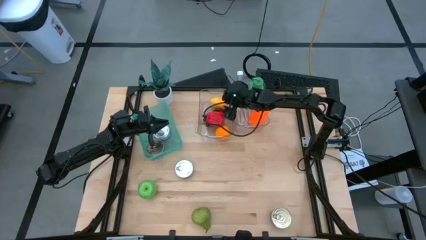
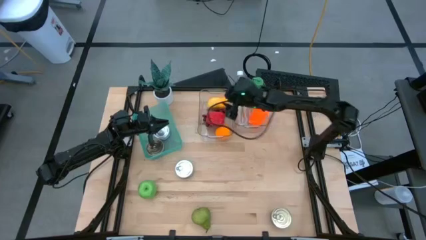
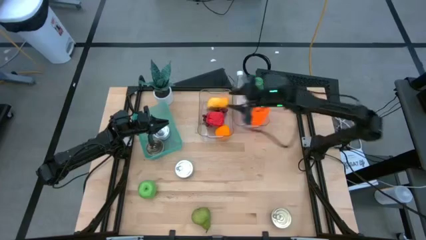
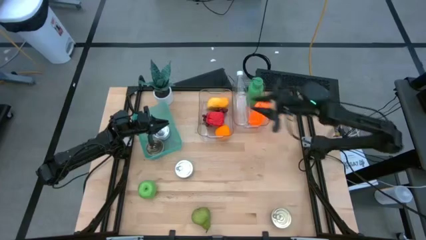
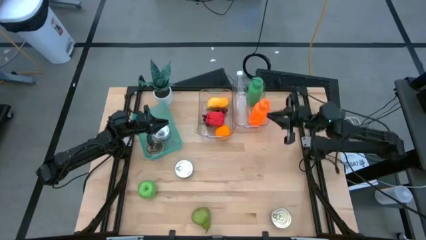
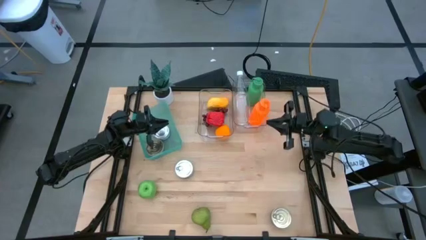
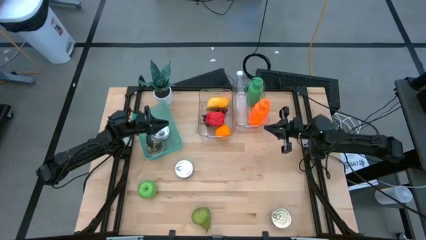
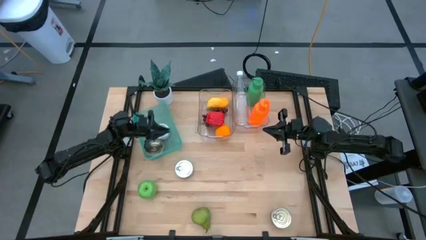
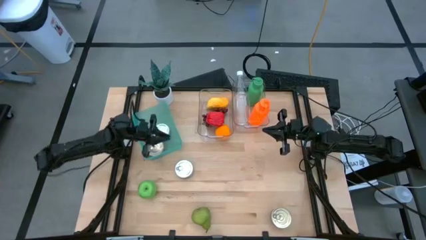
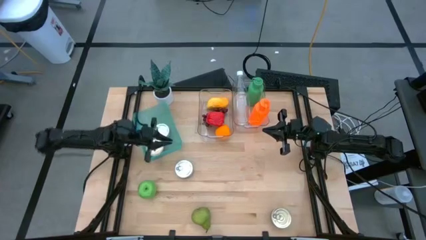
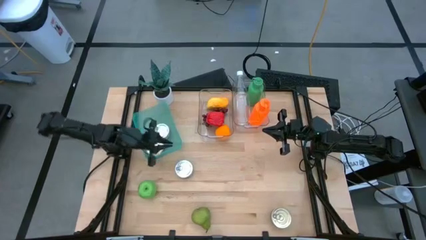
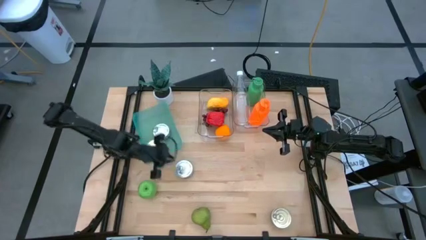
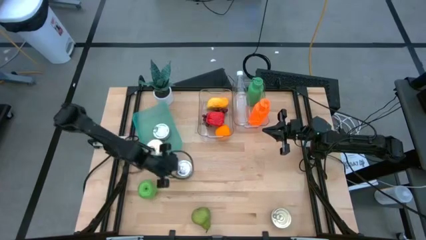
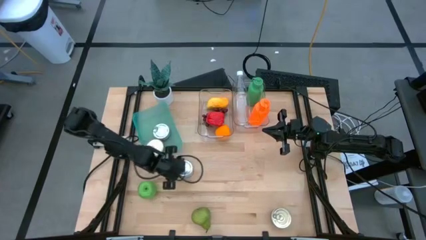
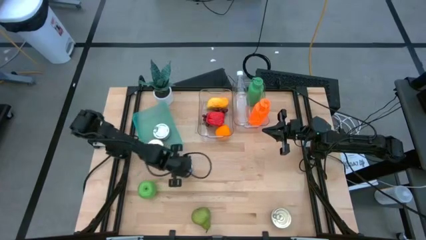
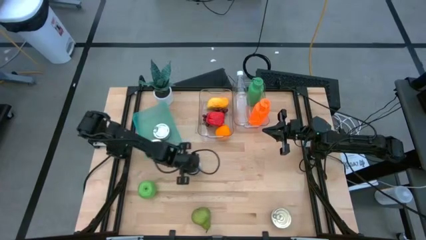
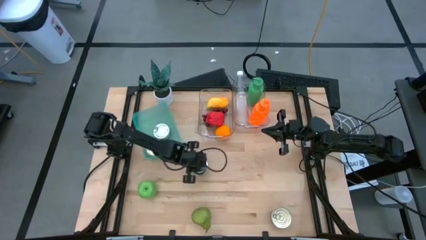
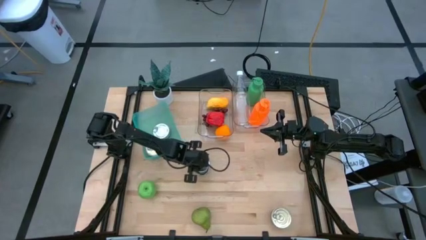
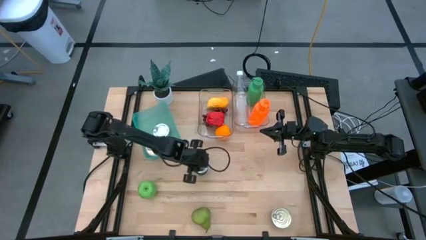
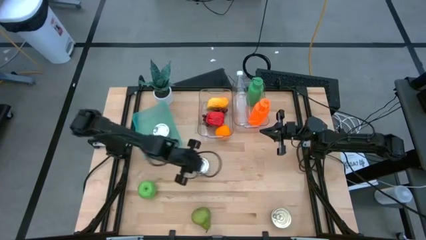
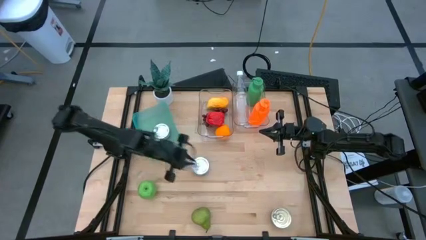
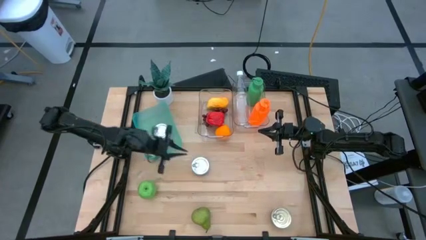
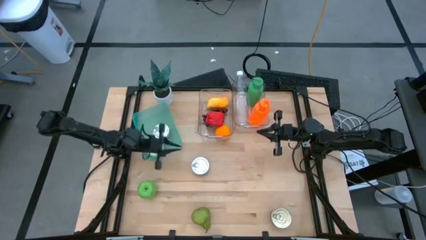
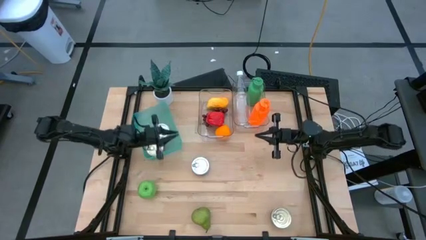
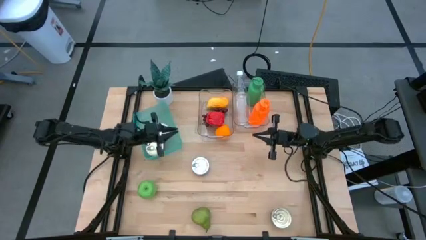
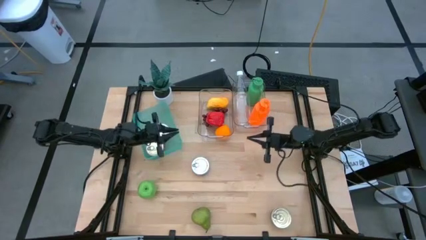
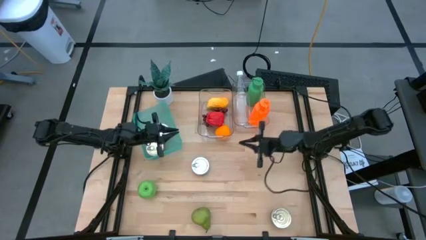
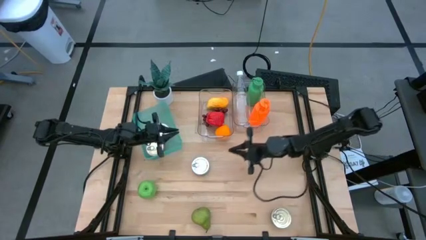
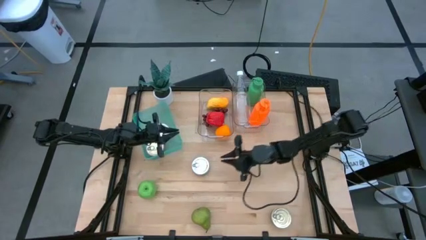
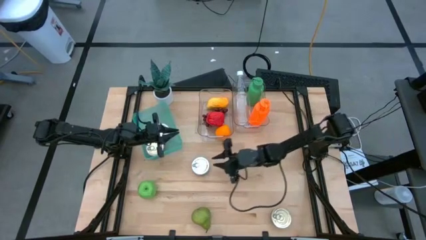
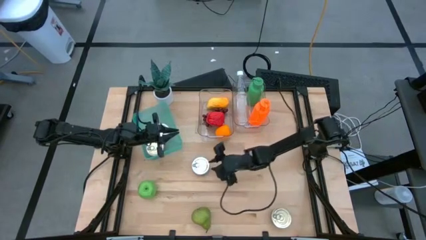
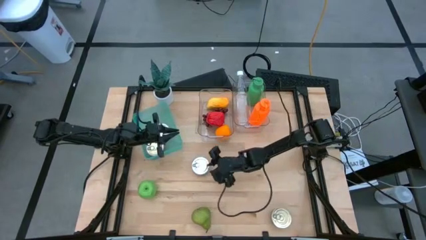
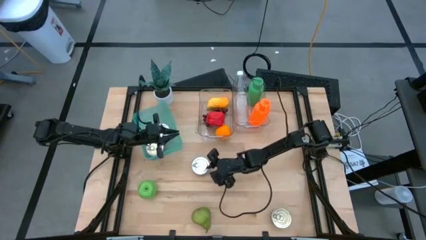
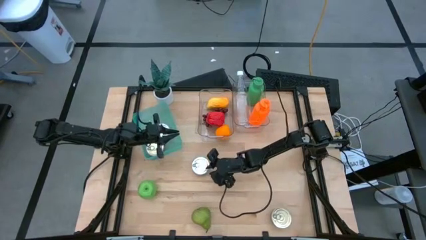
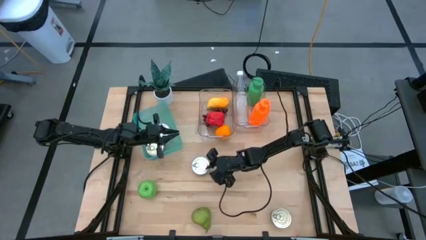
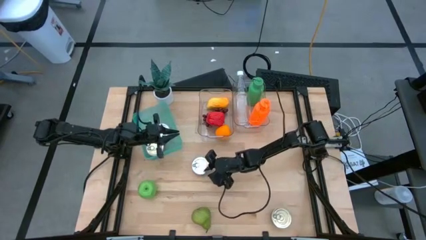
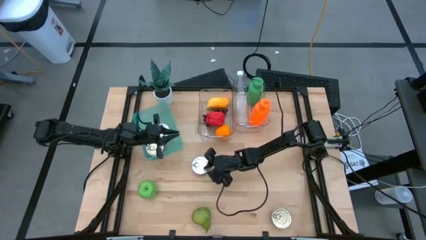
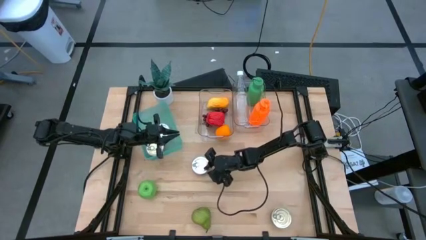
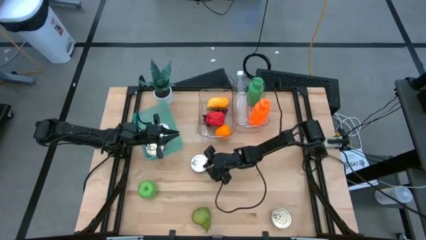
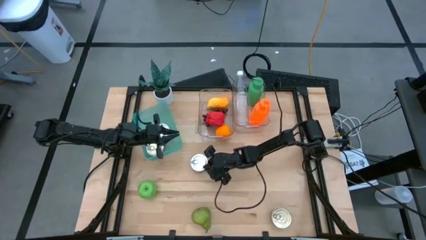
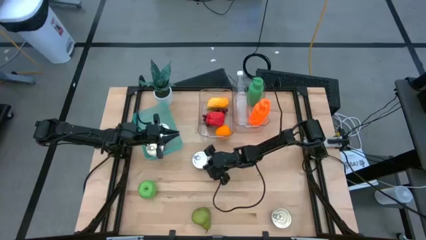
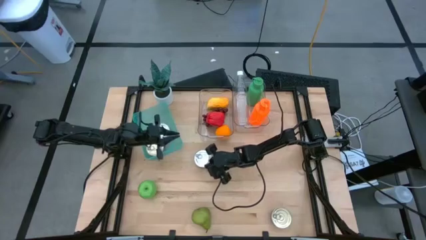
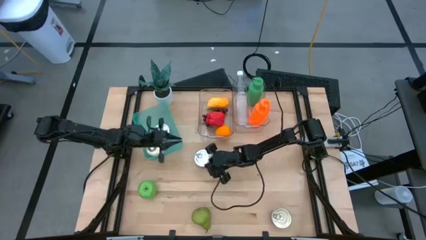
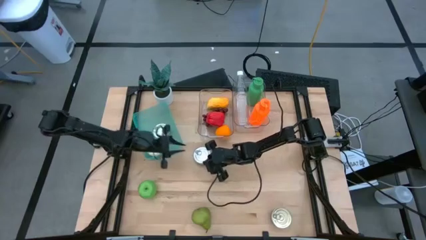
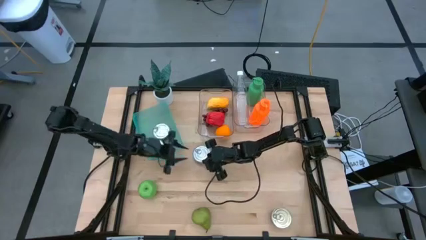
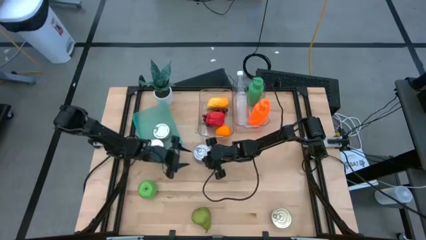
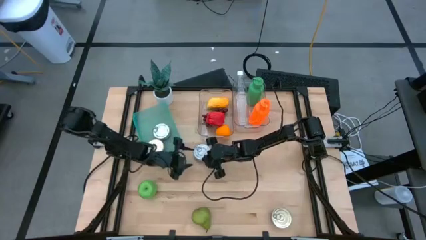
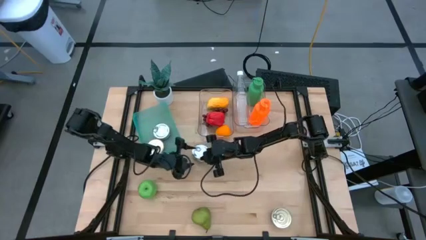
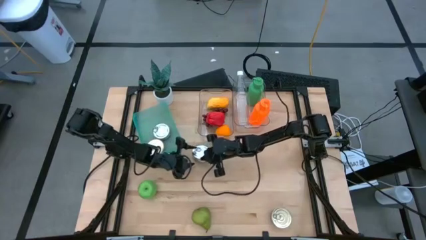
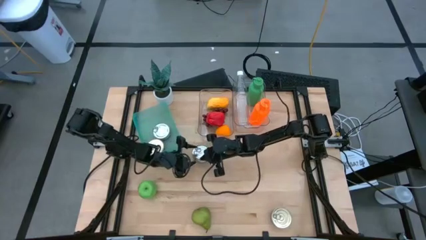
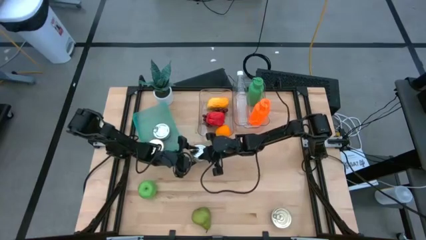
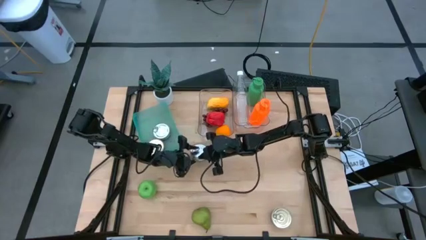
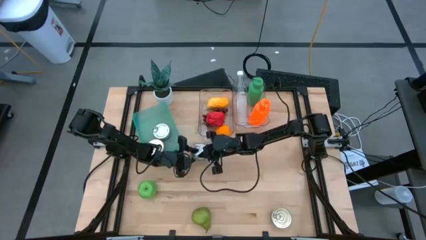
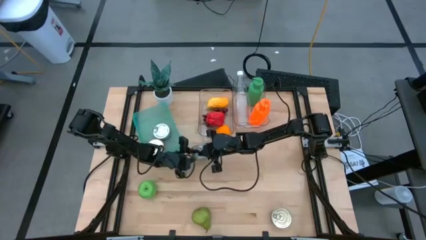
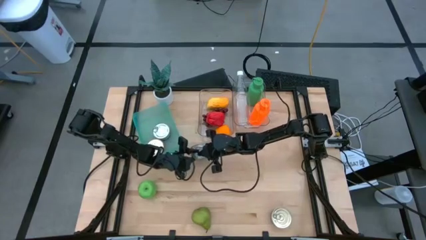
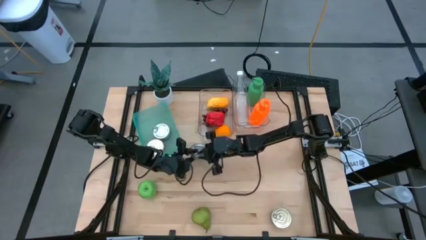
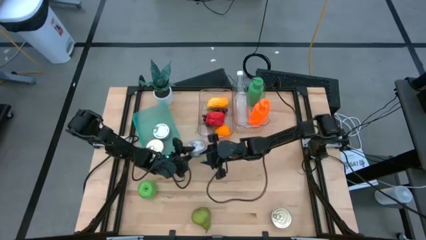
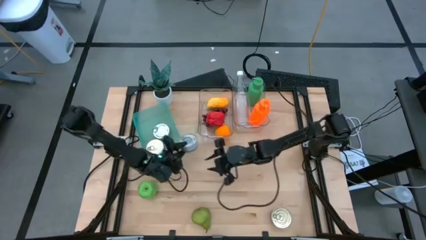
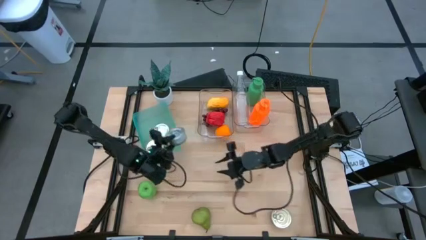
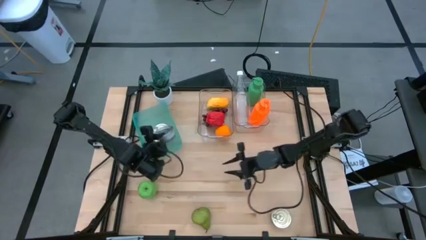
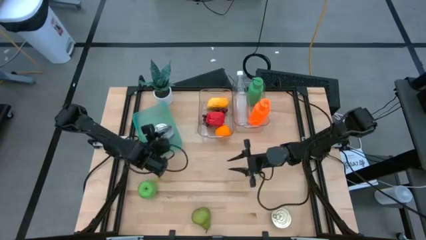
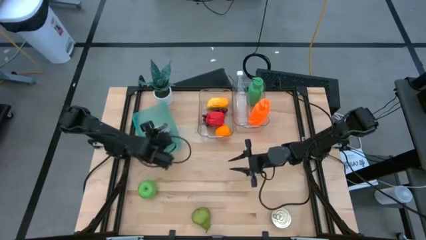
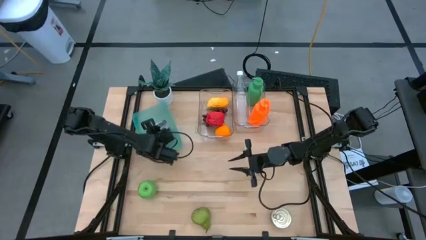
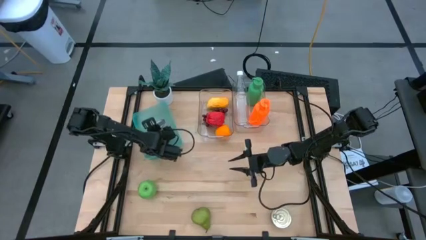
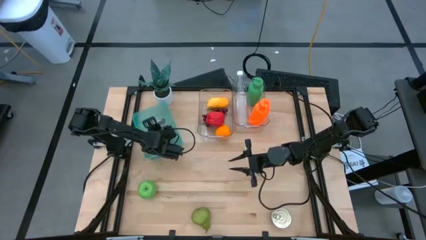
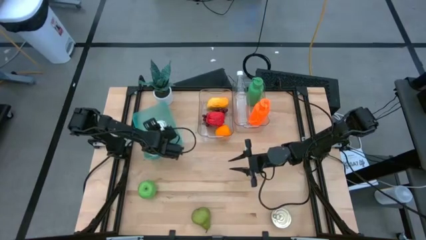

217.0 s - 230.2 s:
Task: Pick & Place Food Item
Stack the green tuna can on top of the green tuna can in the bin
